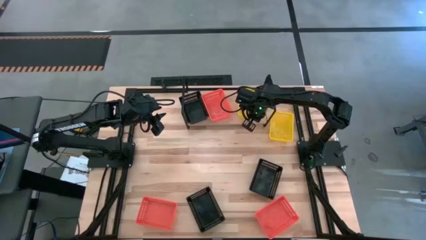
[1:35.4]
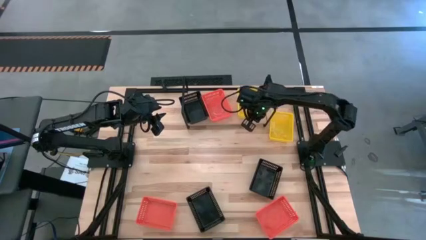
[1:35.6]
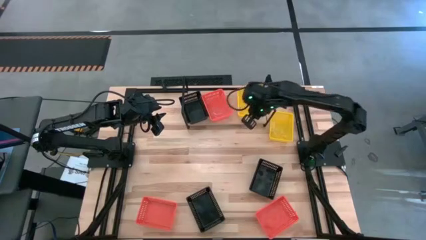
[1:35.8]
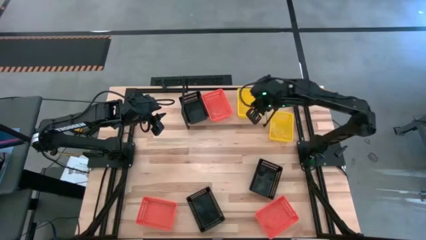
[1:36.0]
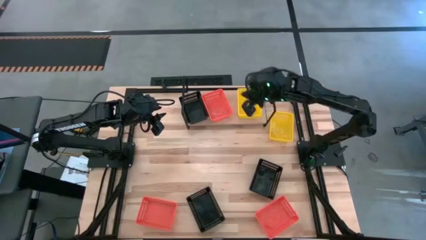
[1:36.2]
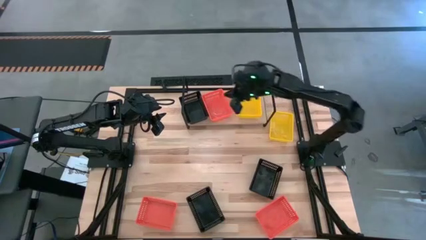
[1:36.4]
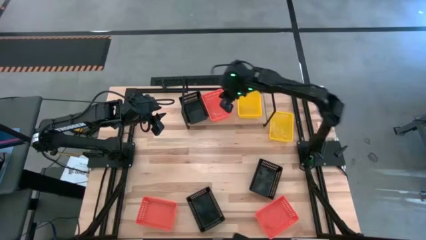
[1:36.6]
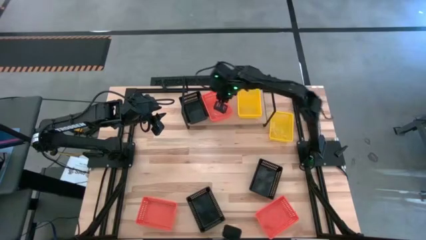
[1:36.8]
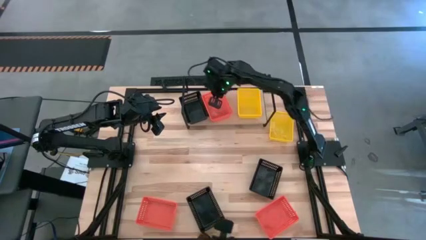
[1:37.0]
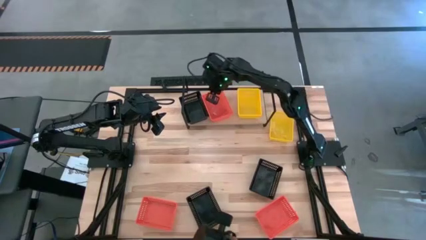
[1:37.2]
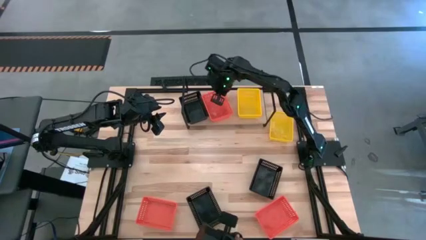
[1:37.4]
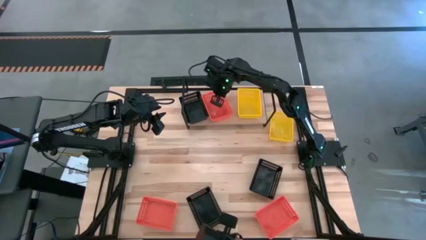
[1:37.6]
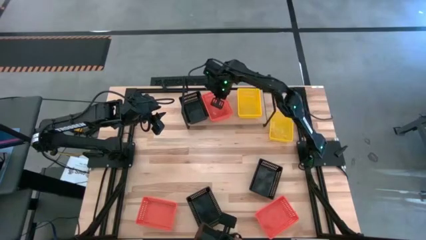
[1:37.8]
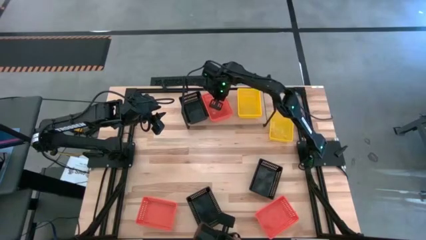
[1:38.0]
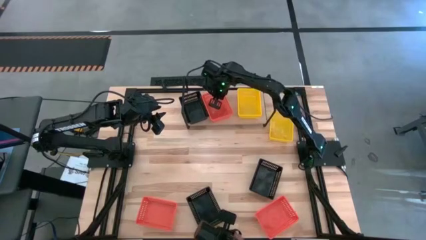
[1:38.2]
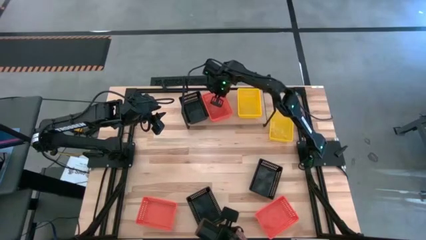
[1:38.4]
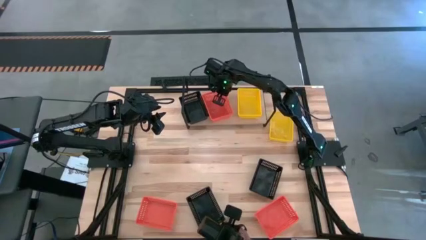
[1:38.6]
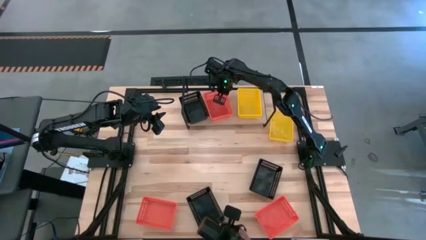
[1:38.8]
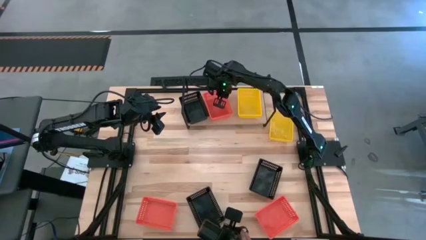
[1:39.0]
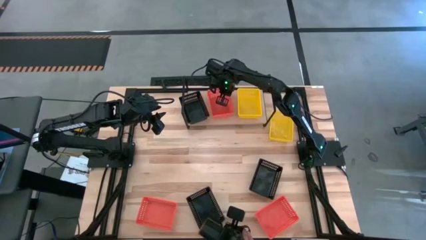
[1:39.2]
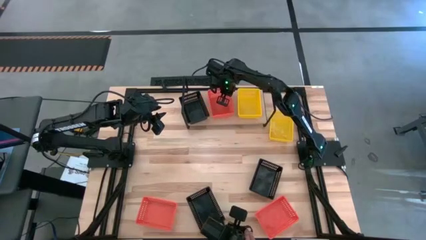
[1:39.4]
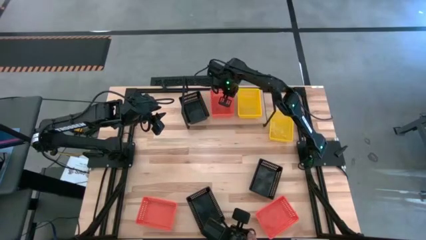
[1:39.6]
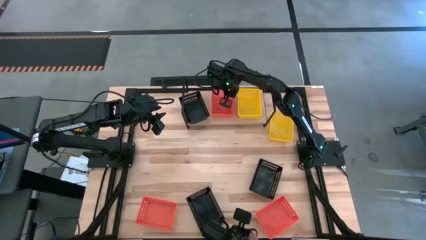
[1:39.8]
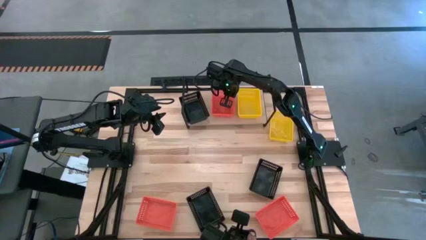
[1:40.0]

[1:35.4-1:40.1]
Task: Stack baskets on shelf by color
Adjust the orange bin

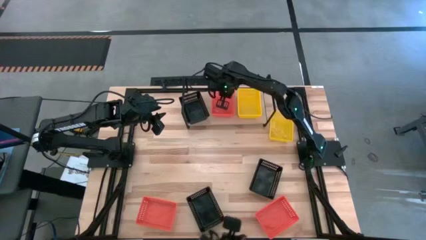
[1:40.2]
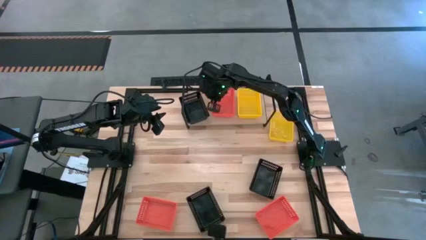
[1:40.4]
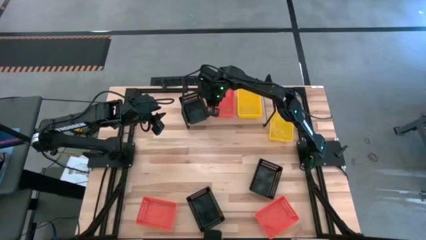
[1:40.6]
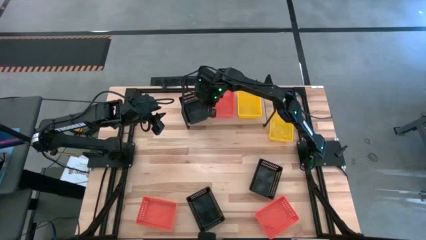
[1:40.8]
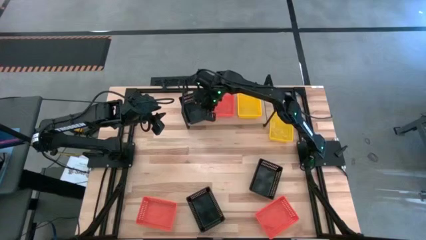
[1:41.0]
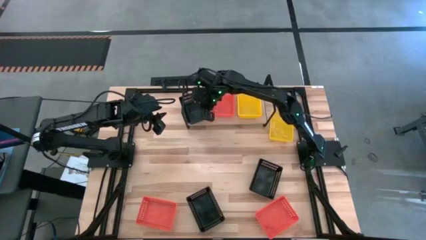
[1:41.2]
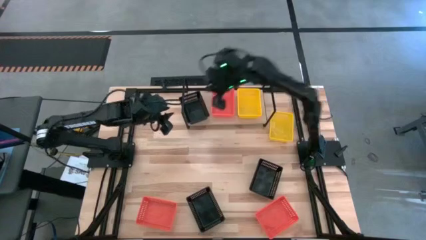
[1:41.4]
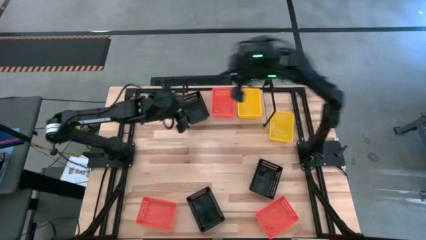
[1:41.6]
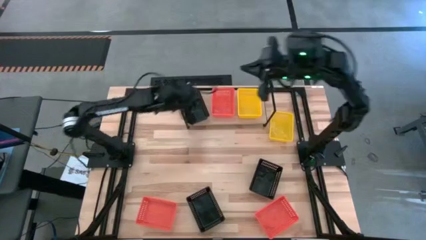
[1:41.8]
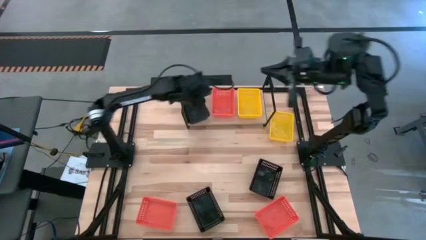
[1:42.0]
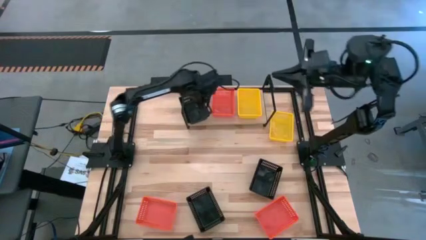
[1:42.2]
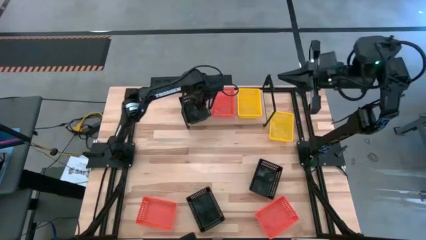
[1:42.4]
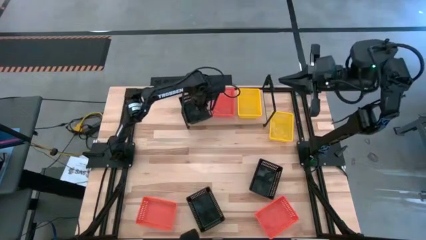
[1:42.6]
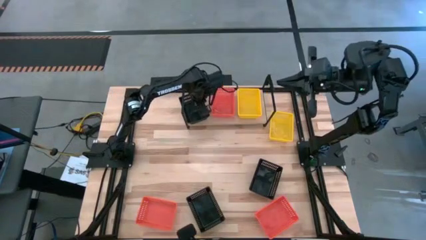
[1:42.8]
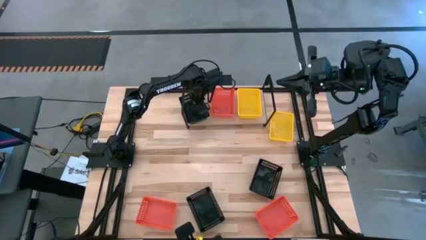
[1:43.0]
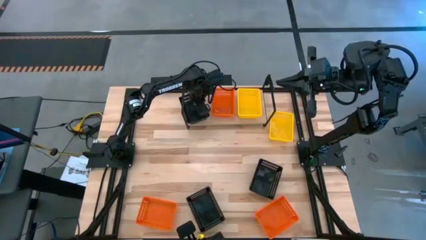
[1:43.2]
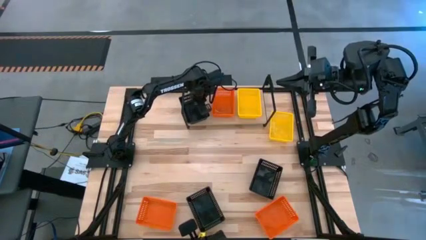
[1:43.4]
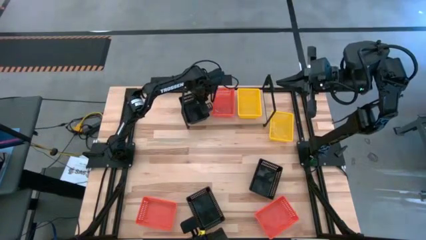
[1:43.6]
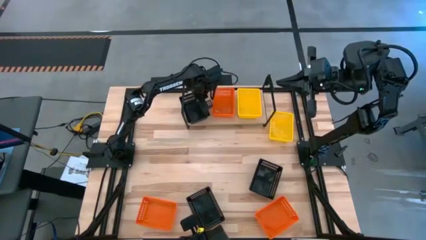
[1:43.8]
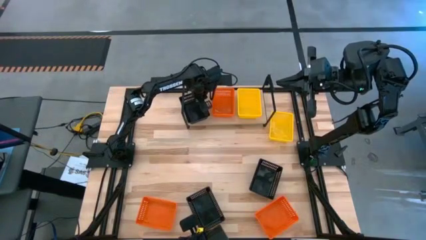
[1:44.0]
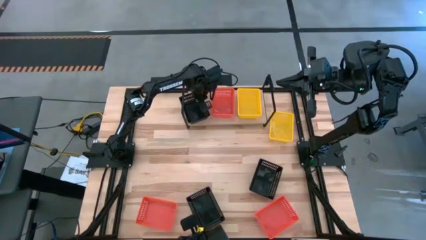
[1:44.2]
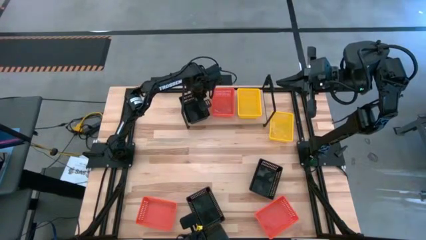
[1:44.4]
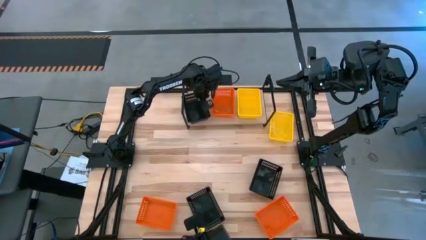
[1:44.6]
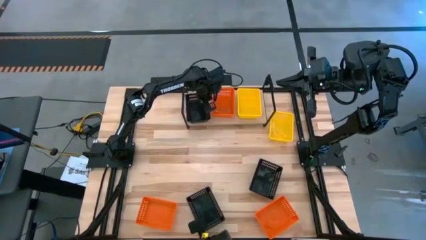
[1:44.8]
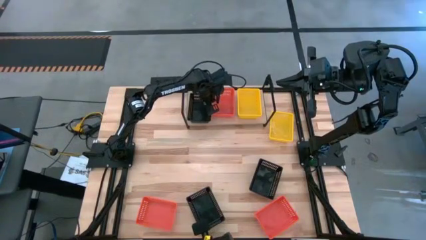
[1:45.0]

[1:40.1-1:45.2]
Adjust the black bin

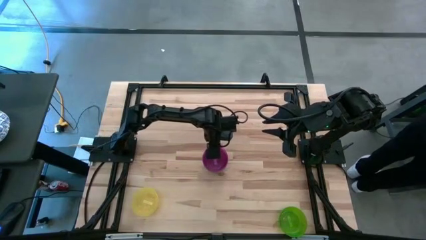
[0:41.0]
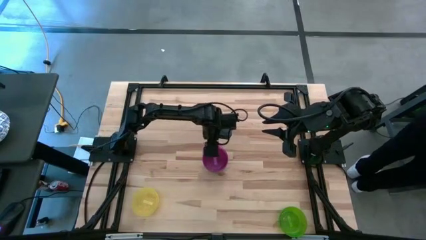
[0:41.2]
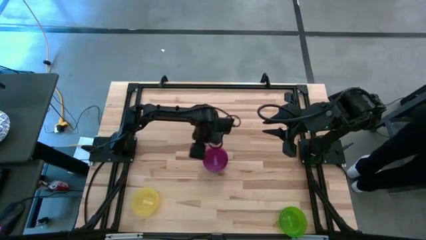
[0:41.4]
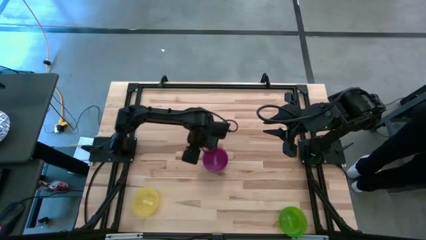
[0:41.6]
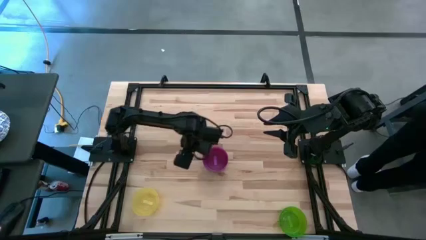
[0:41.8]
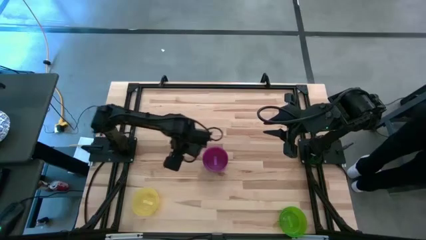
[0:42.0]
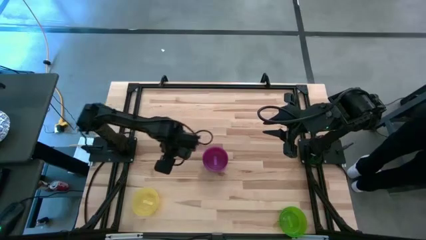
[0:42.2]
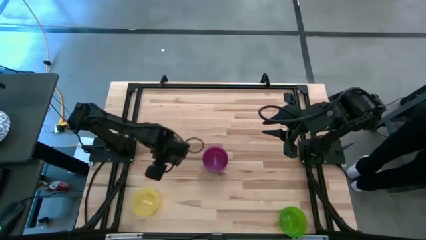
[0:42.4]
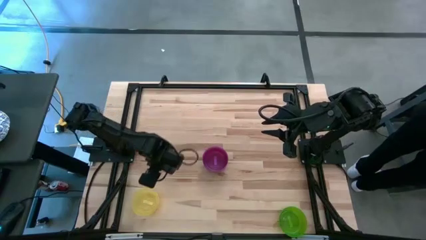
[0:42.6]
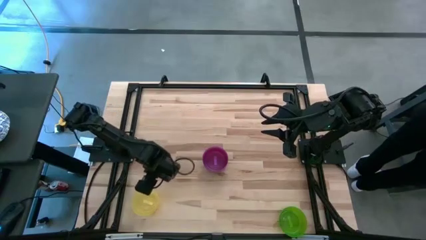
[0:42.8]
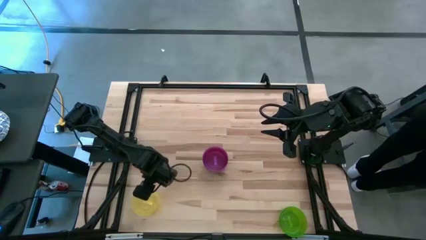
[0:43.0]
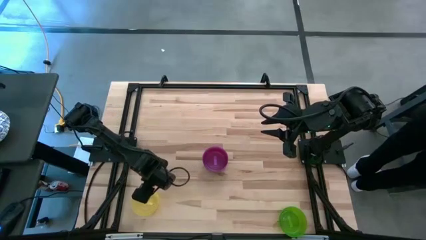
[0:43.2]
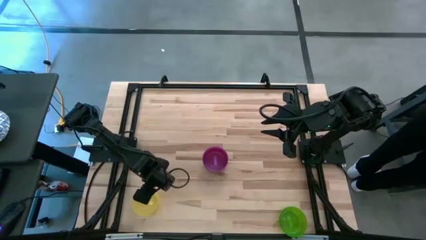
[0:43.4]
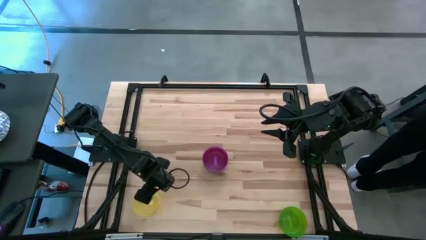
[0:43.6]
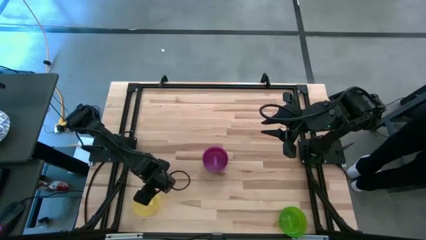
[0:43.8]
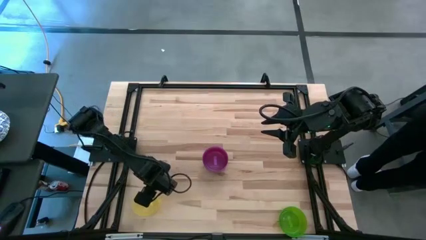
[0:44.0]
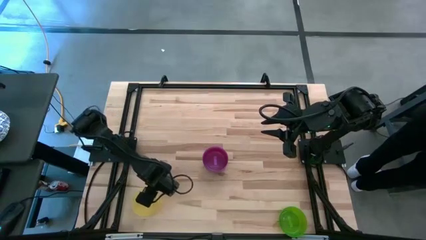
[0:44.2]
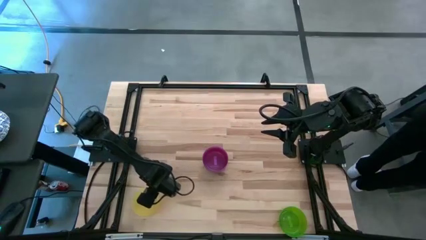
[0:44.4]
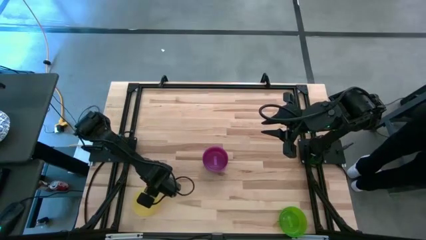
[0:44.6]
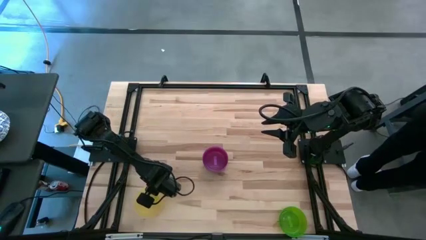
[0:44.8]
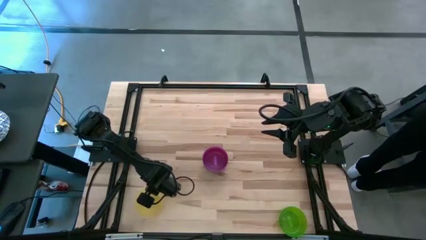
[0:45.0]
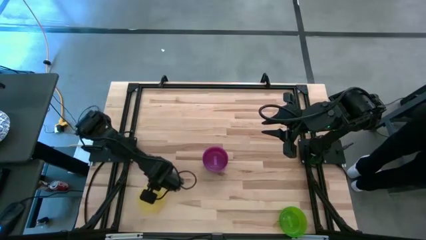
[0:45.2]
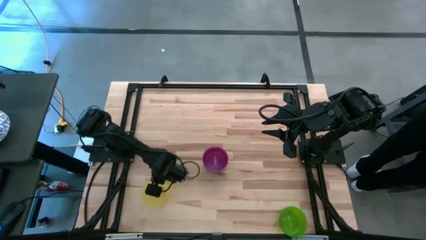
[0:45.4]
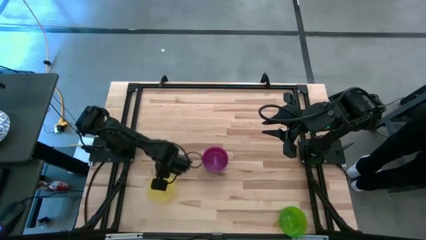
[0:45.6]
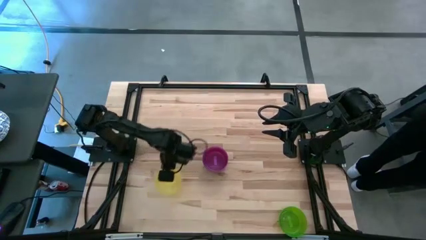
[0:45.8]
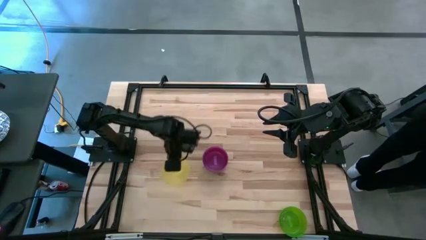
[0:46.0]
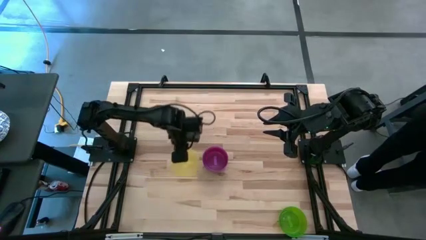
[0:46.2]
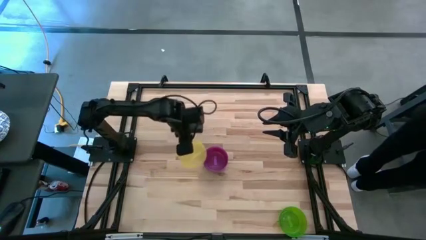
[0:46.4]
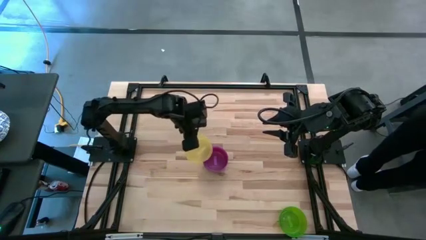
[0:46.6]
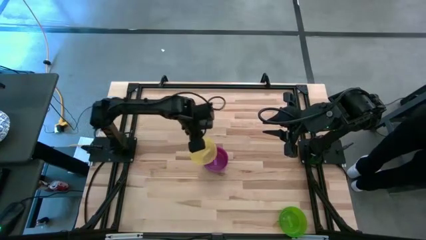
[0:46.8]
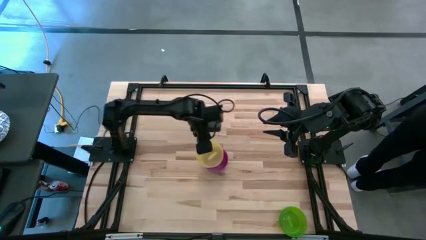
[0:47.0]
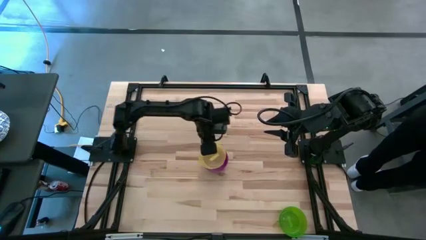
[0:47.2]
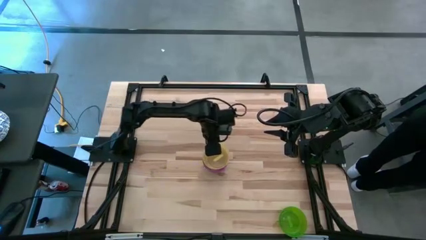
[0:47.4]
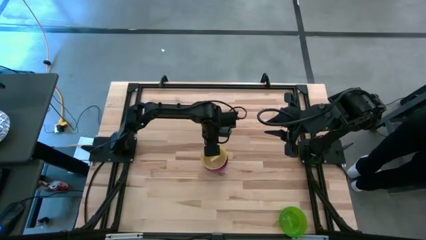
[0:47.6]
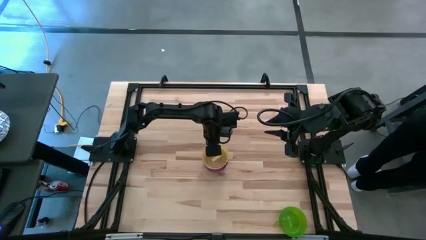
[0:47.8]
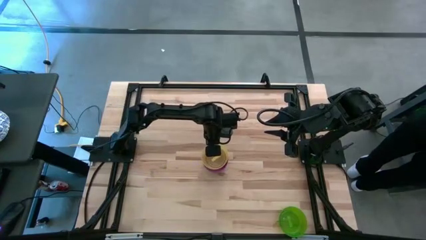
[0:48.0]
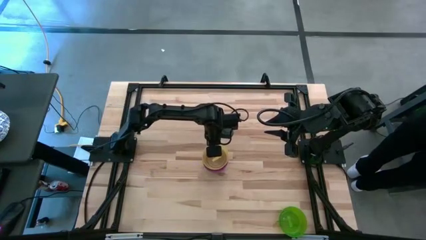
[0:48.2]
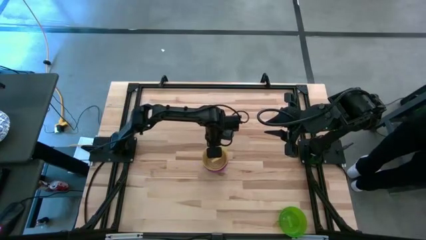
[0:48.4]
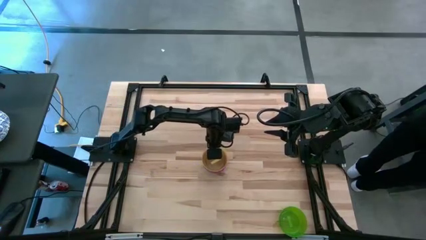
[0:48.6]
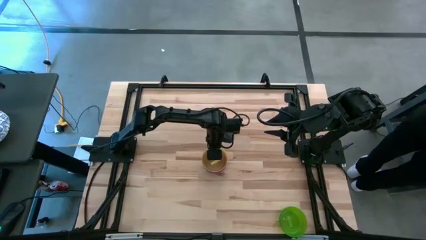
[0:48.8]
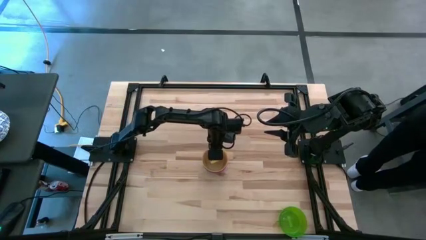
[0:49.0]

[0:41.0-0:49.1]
Task: Nest bowls inside each other
Stack the yellow bowl on top of the violet bowl
